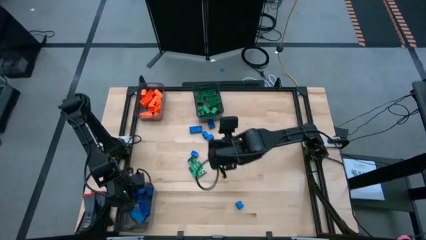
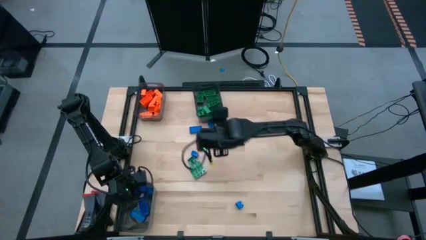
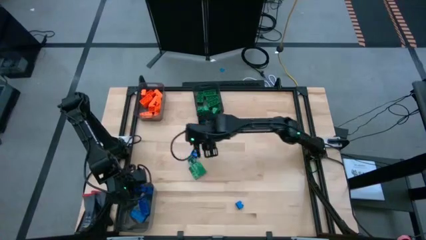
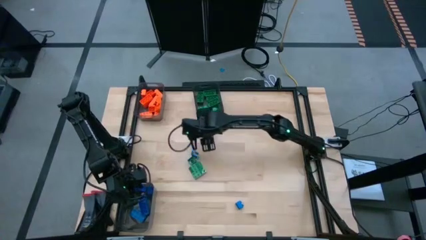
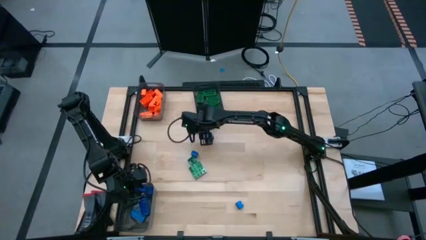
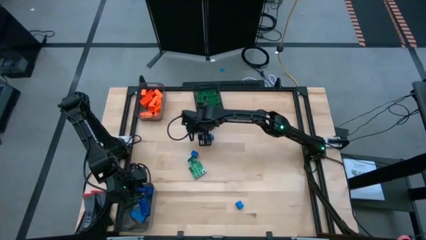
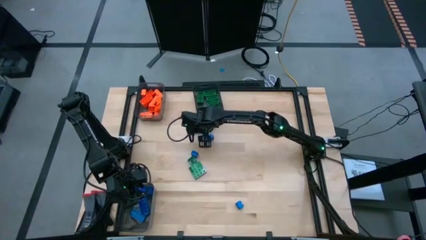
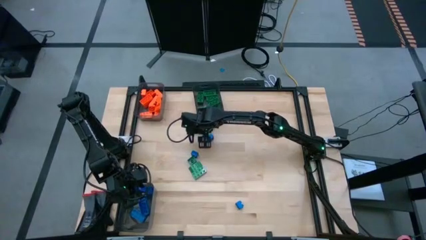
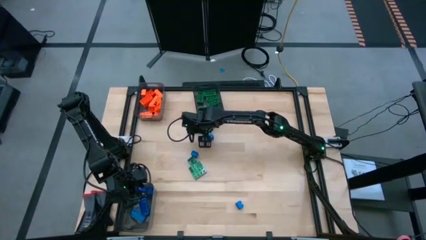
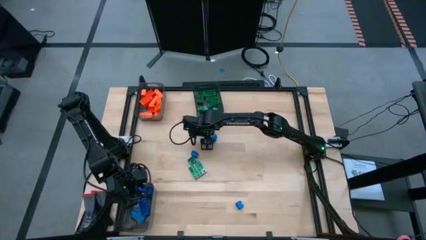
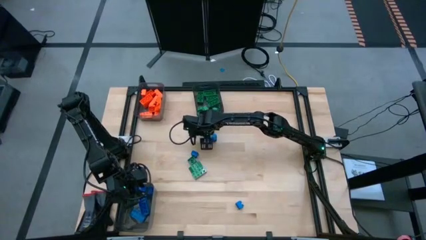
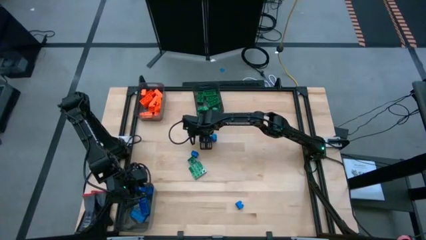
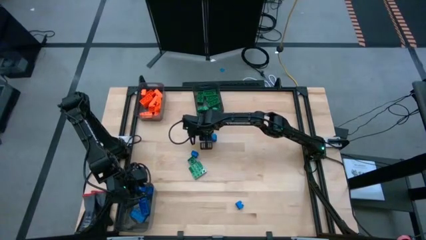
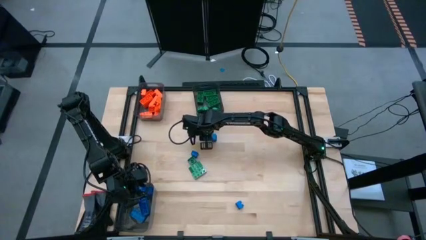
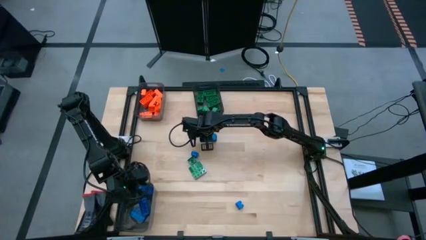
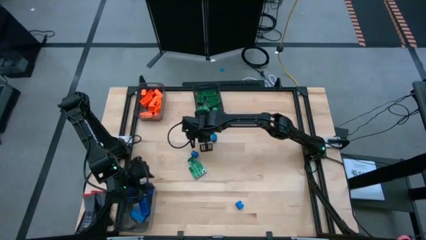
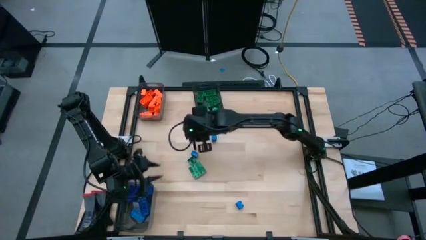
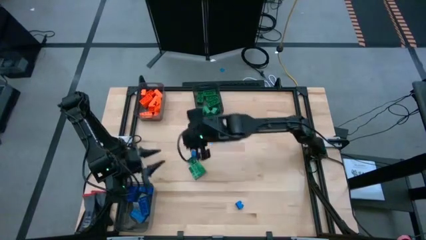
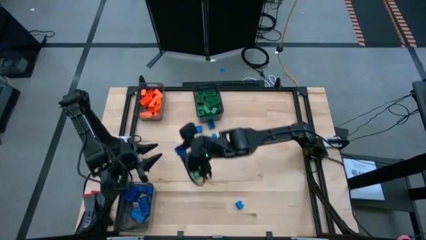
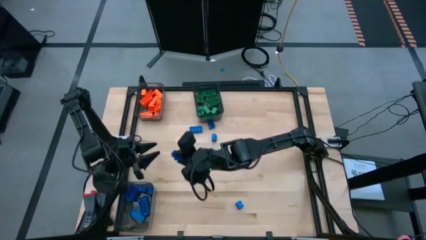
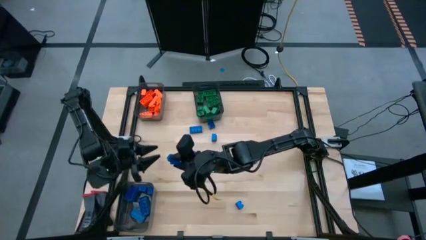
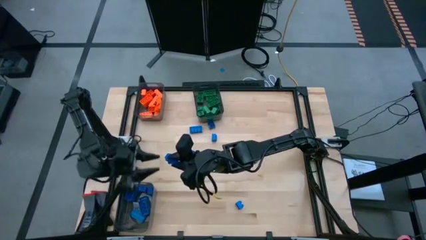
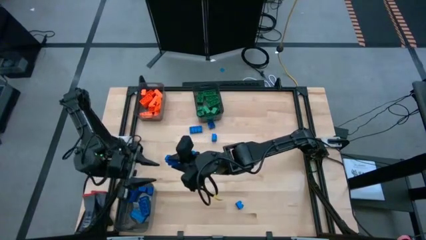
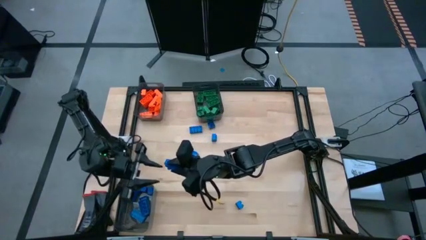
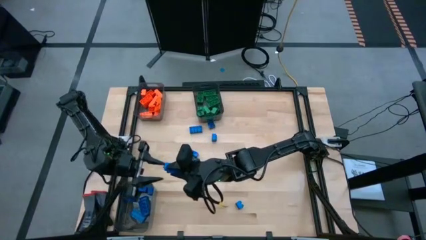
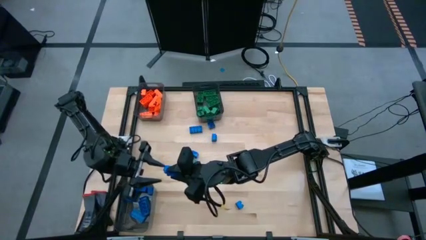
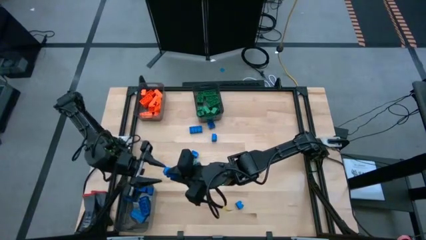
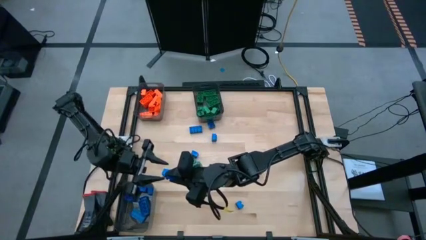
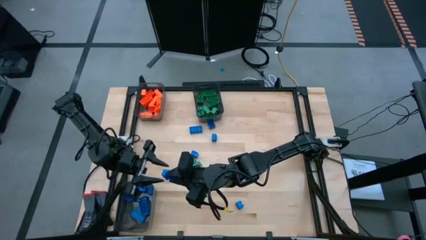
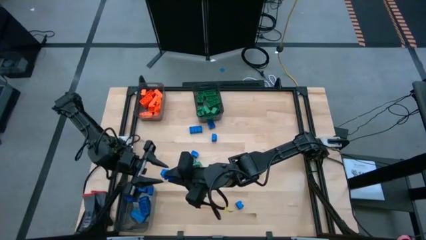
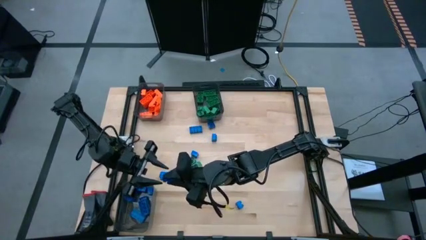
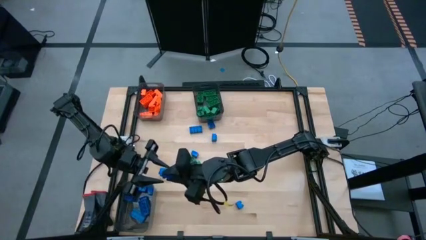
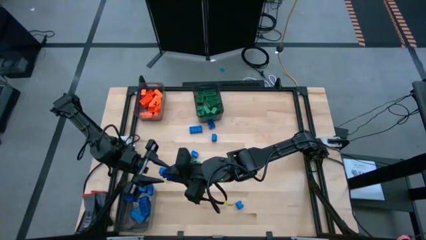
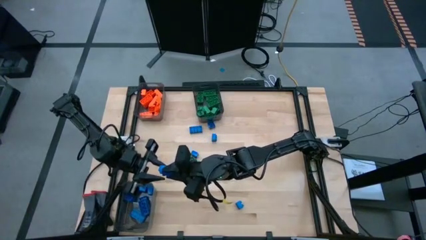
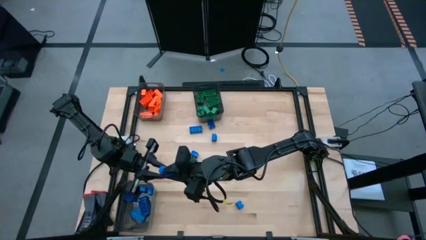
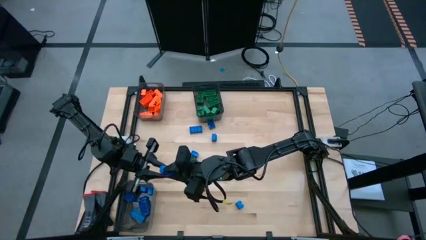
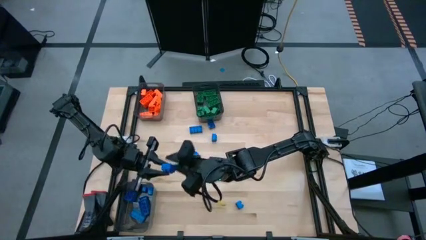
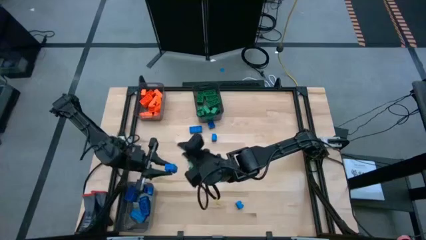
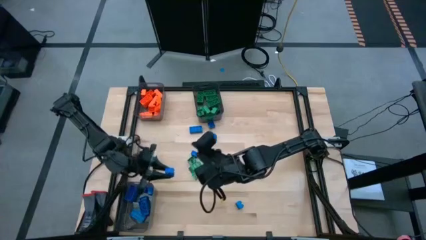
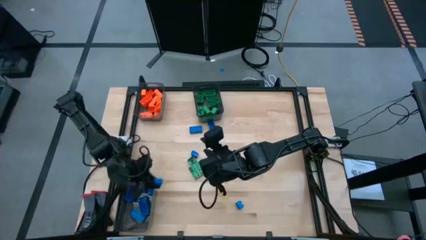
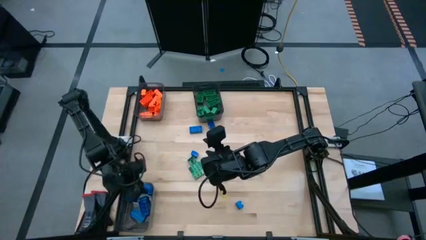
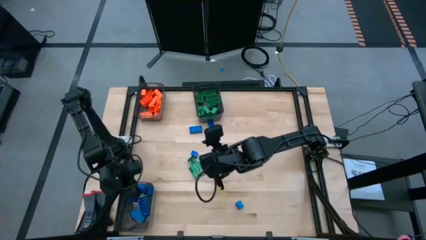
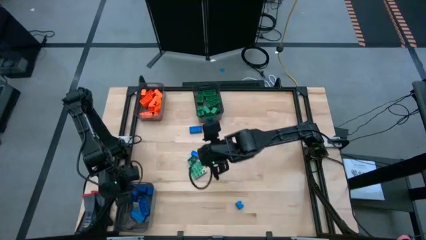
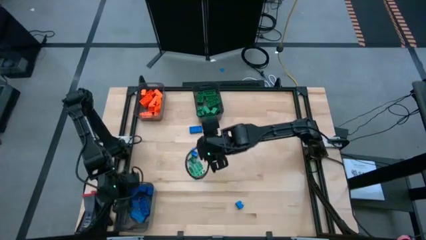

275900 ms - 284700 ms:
Task: Sort blocks
Put the blue game piece into the bottom left black transparent bin

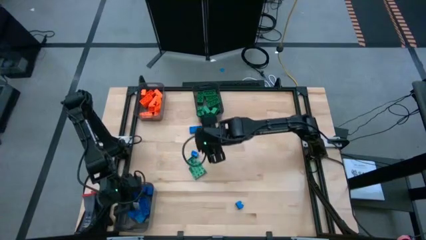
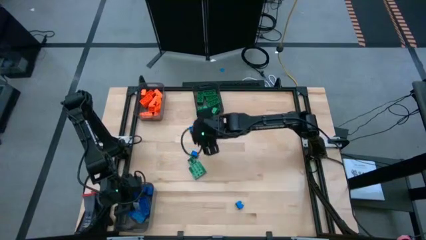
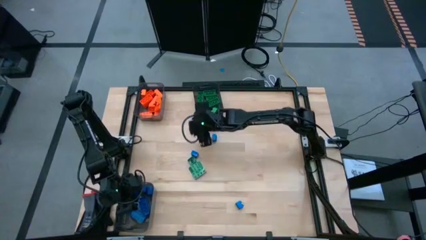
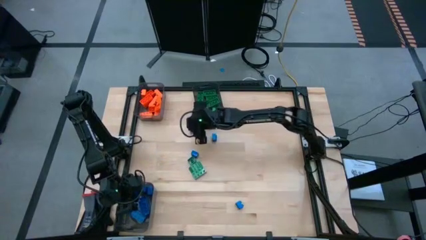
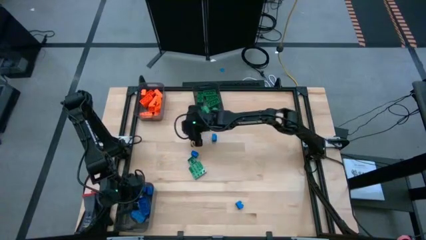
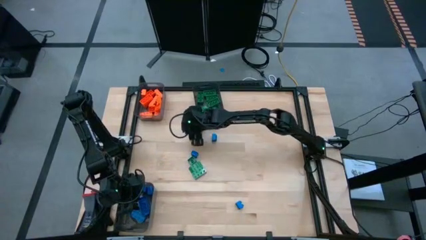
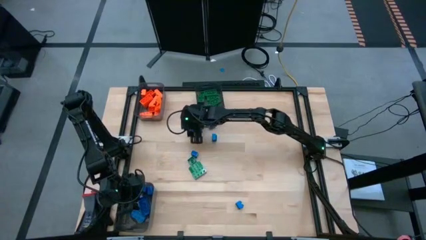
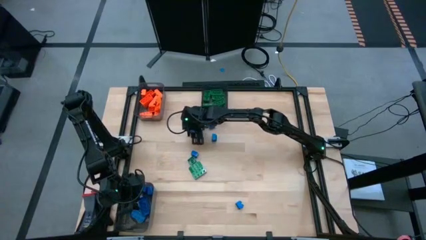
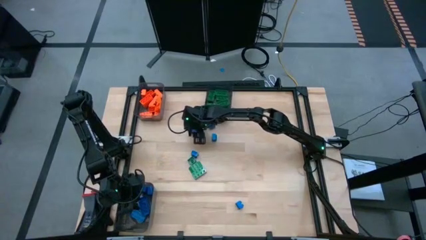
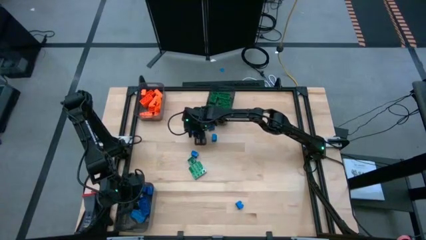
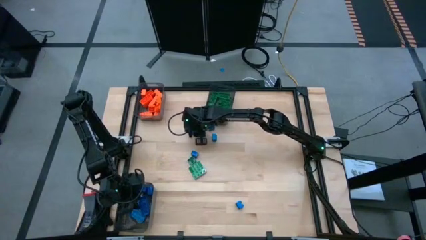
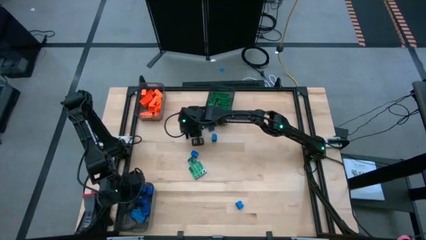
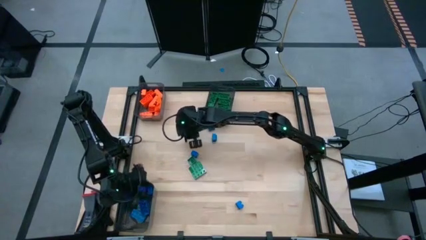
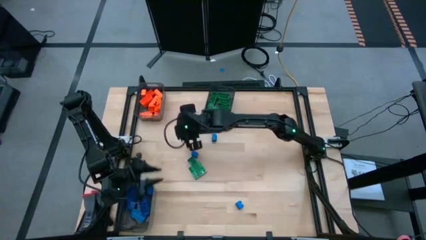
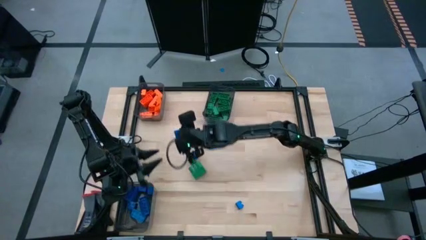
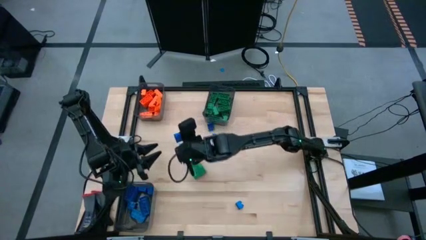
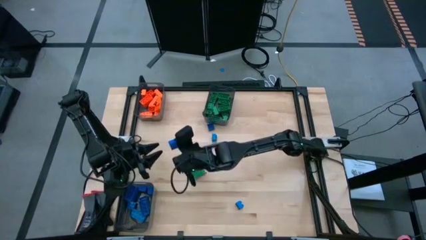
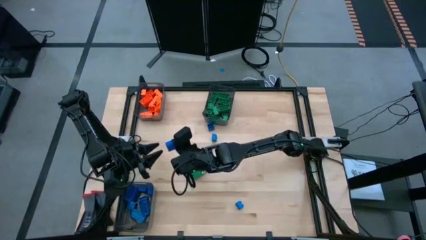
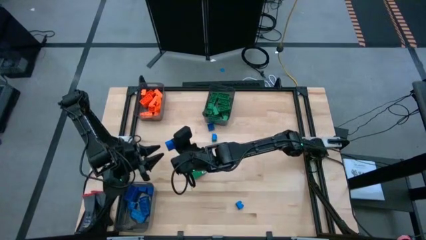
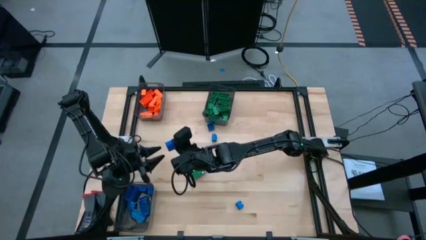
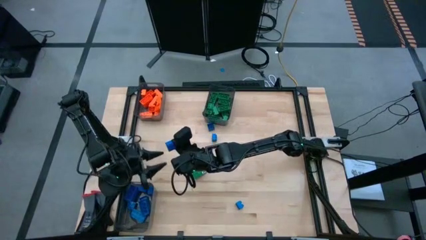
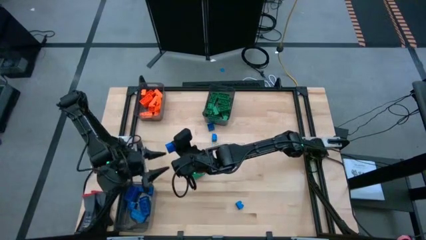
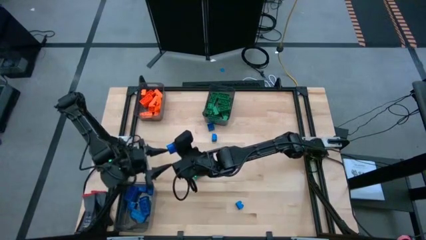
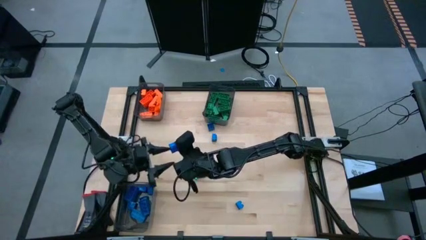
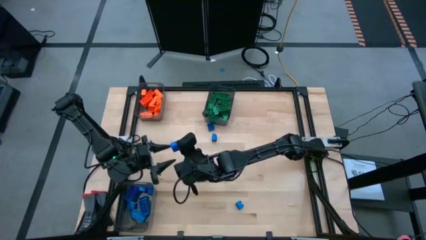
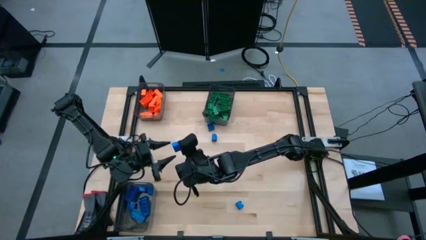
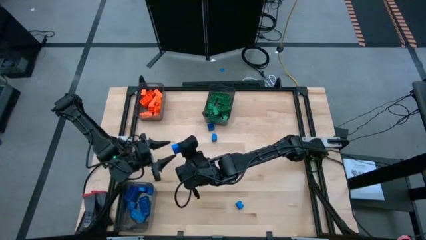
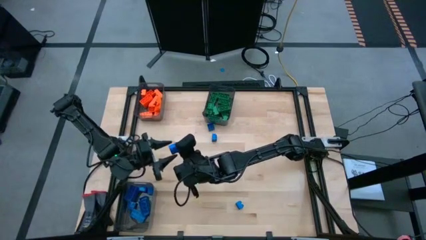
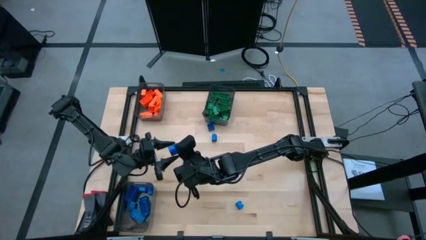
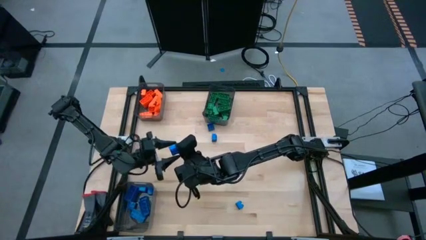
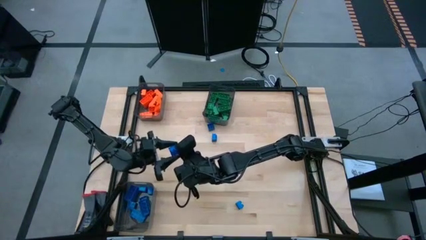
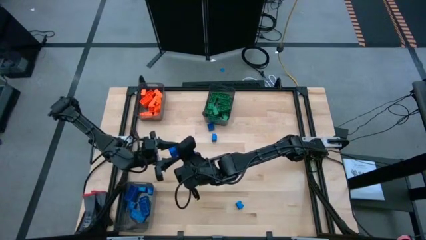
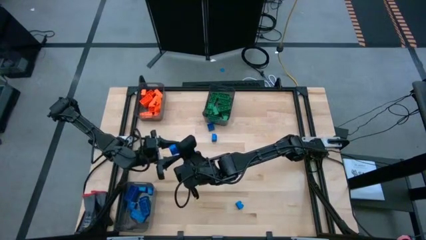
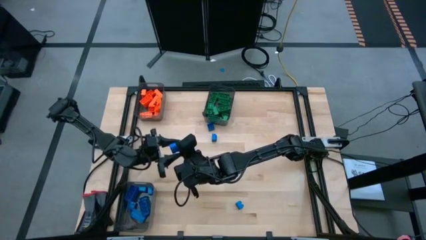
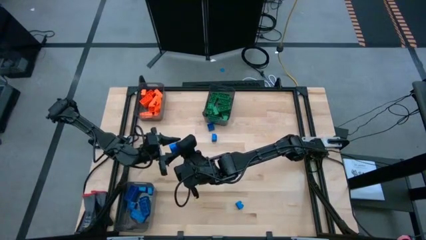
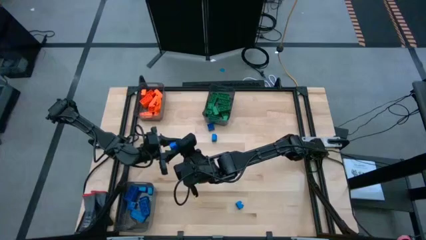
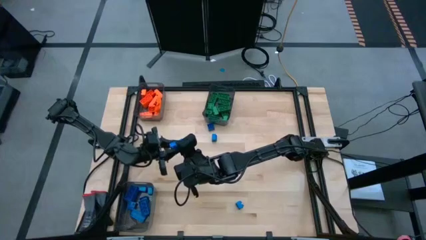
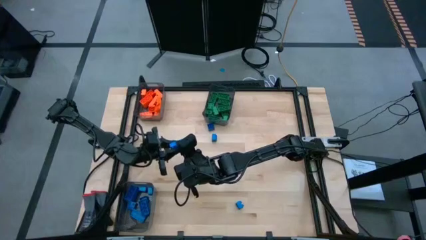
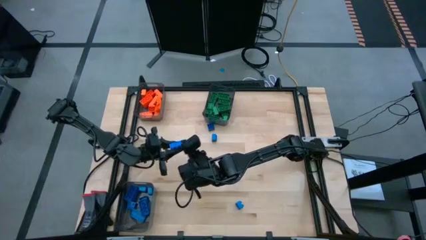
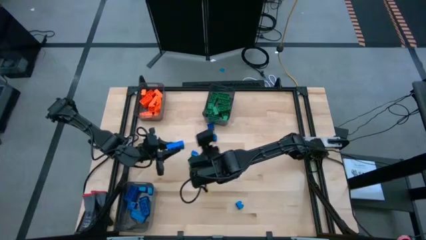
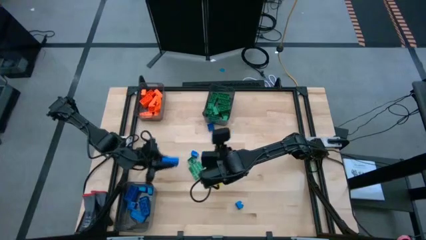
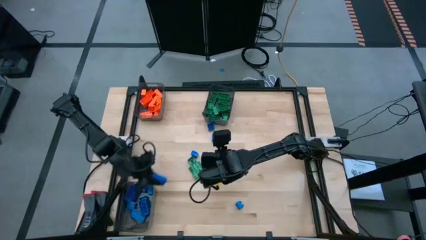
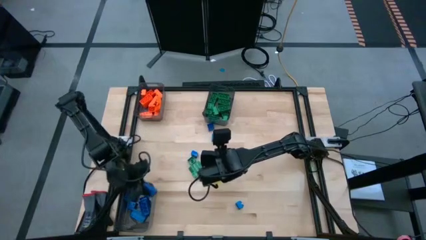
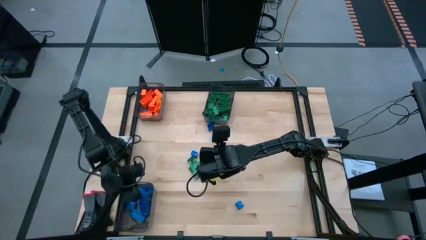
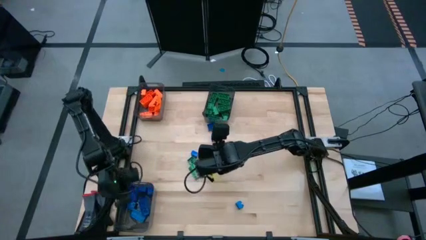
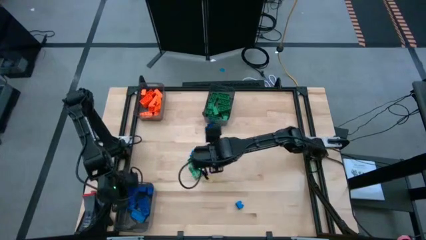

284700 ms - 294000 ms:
Put the blue game piece into the bottom left black transparent bin
